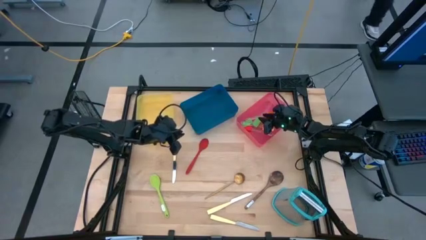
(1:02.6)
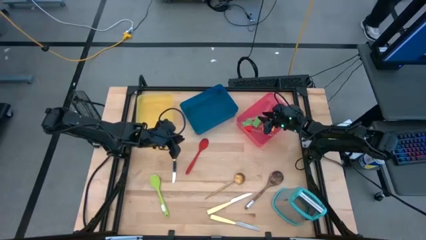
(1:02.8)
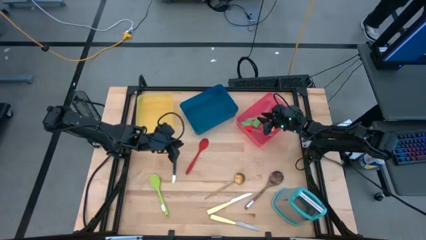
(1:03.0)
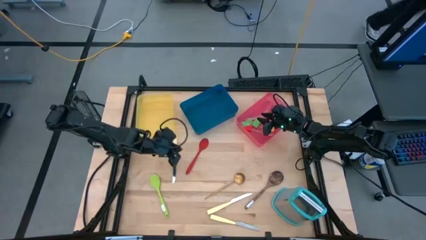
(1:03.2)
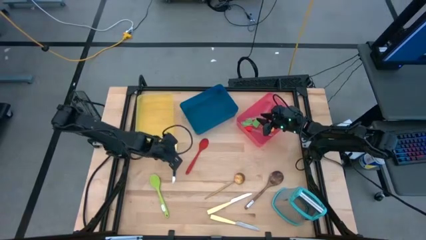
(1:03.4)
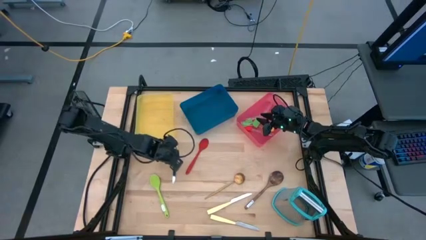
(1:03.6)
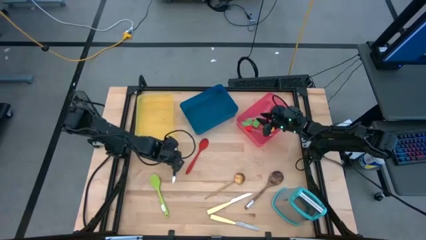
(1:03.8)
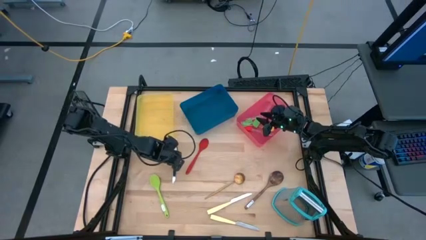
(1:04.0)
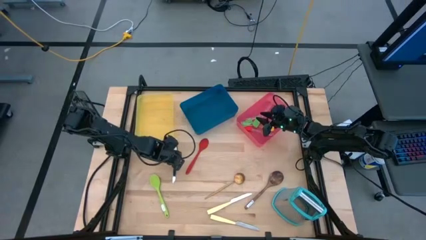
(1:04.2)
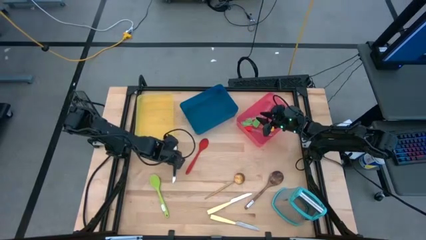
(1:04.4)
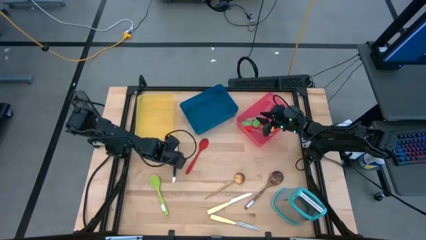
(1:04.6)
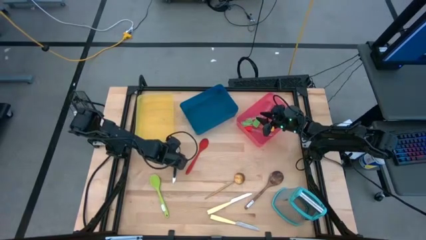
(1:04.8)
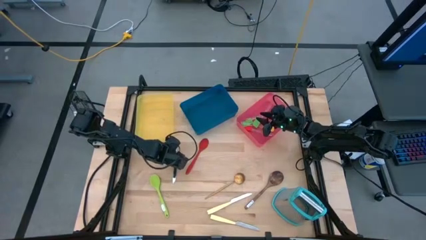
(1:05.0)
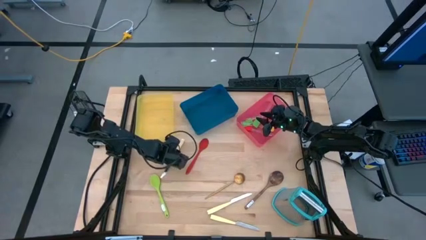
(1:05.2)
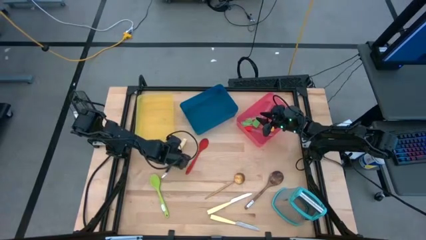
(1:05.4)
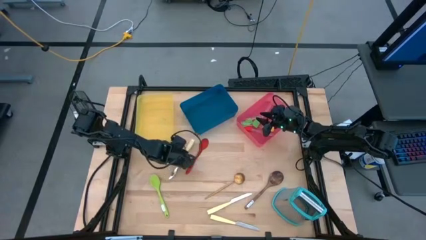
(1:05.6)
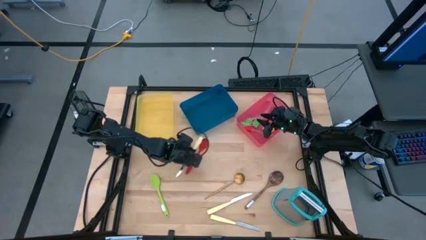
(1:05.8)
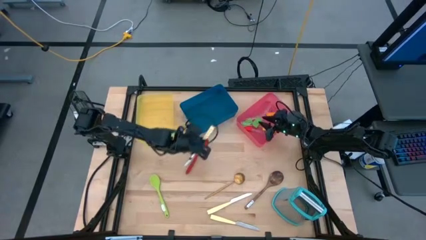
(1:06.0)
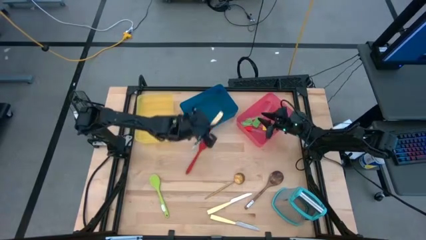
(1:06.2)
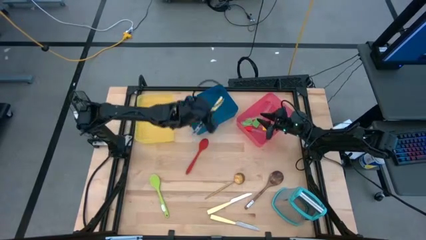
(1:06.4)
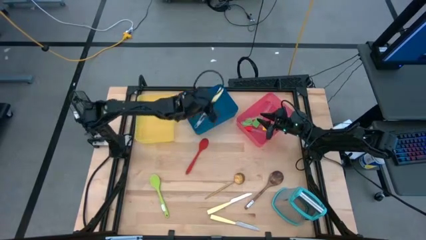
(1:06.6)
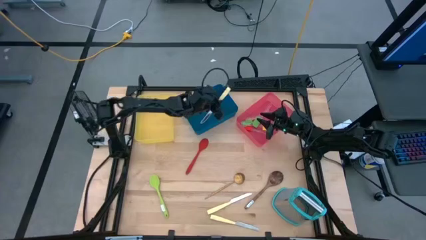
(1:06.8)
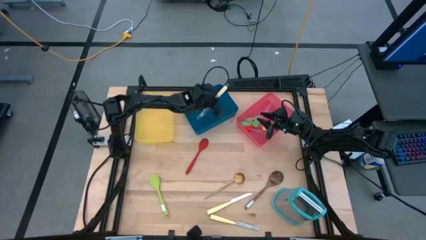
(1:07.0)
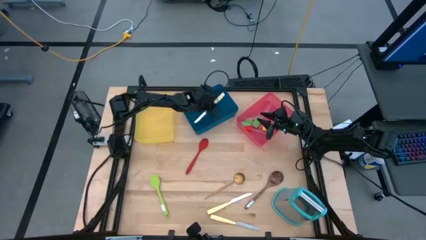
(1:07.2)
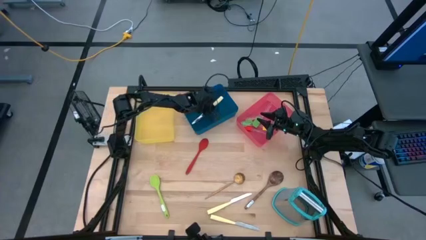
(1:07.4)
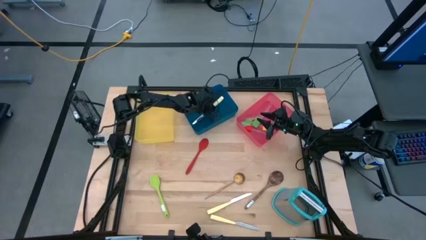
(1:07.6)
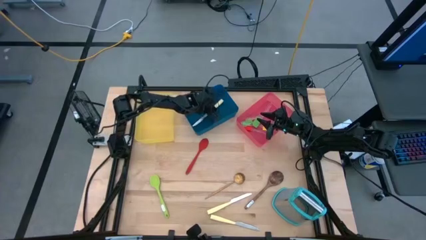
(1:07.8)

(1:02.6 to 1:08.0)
Task: Pick & Place Kitchen Items
Put the yellow knife into the blue bin

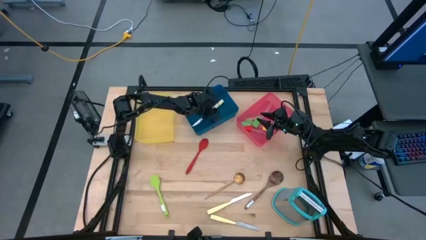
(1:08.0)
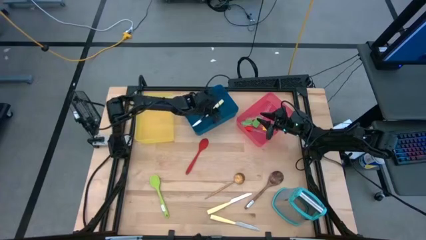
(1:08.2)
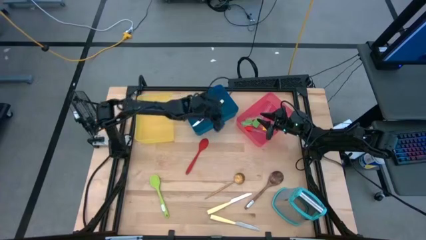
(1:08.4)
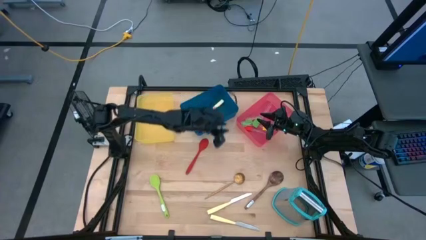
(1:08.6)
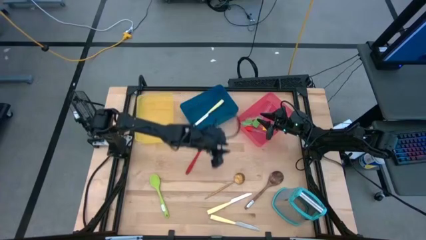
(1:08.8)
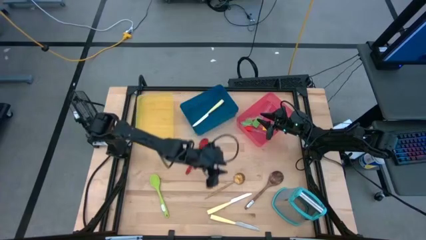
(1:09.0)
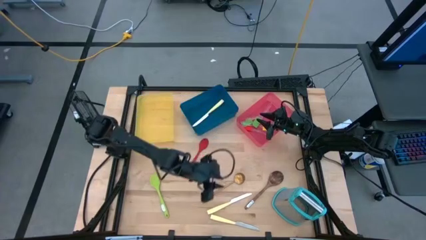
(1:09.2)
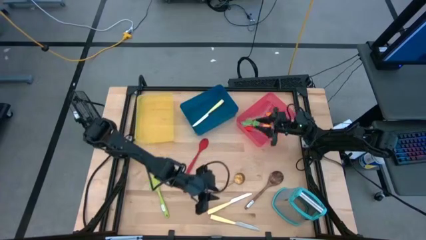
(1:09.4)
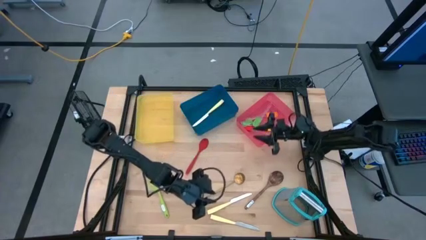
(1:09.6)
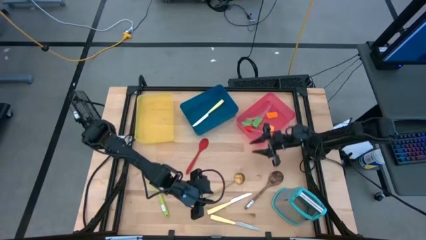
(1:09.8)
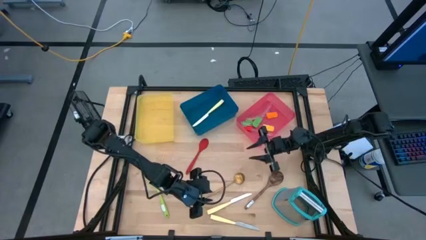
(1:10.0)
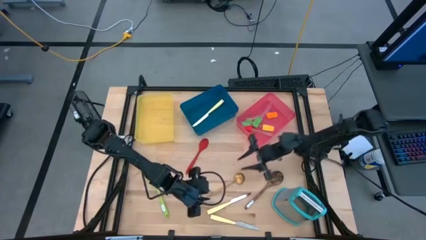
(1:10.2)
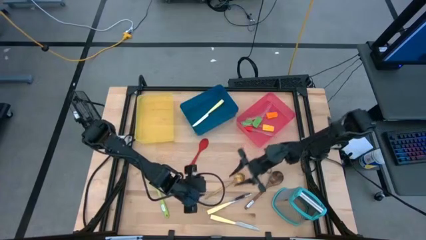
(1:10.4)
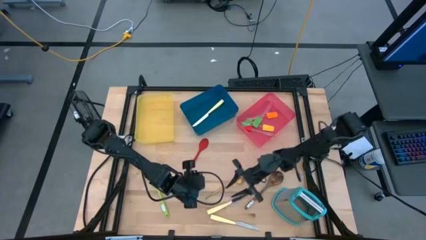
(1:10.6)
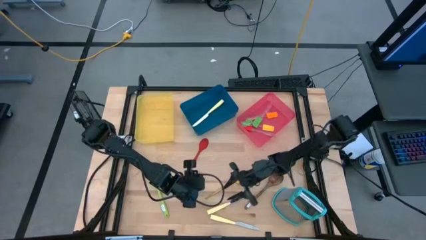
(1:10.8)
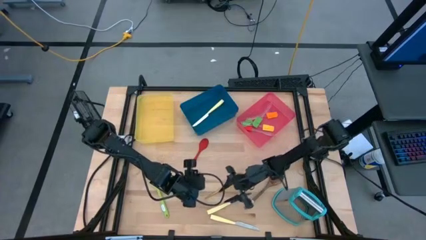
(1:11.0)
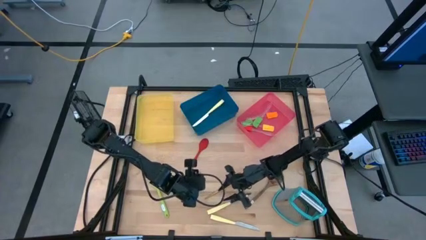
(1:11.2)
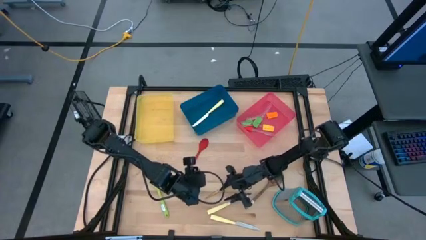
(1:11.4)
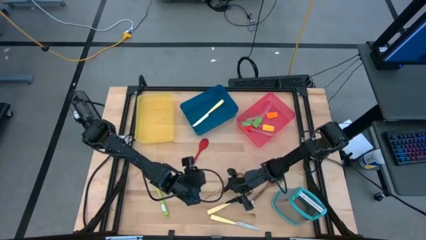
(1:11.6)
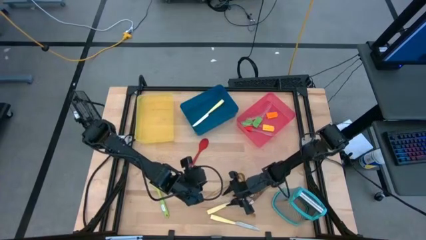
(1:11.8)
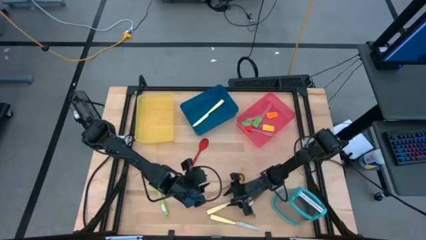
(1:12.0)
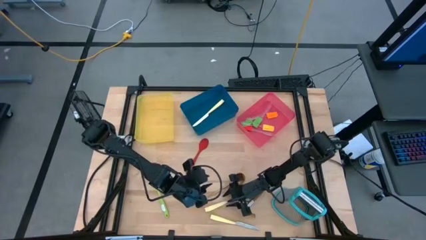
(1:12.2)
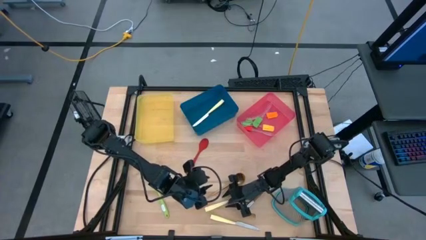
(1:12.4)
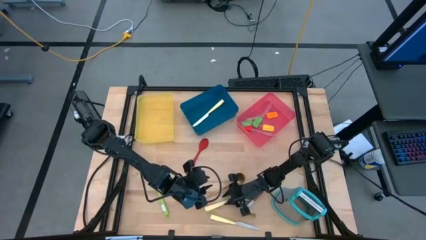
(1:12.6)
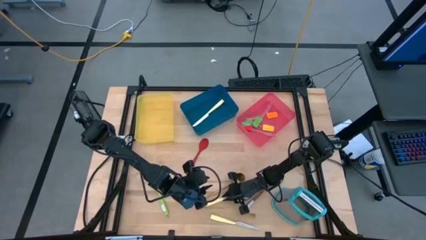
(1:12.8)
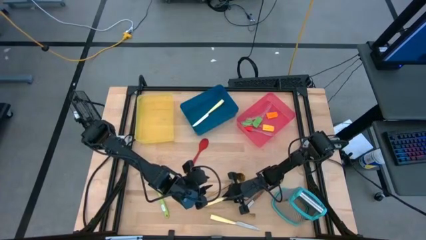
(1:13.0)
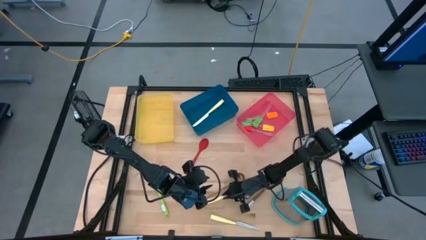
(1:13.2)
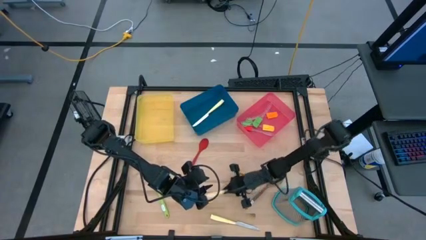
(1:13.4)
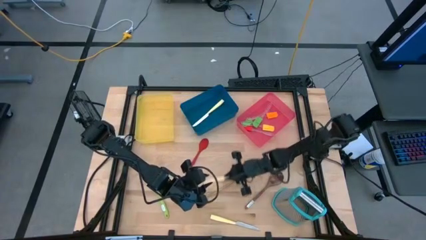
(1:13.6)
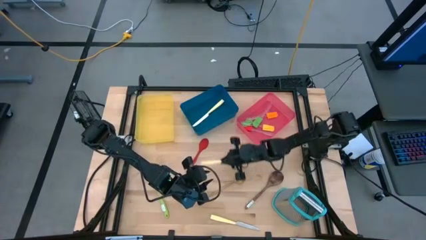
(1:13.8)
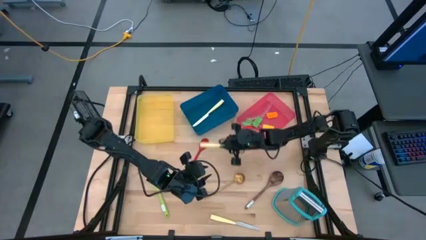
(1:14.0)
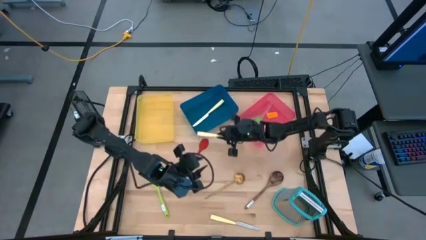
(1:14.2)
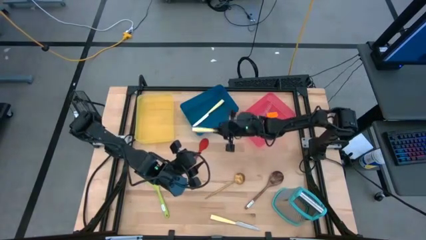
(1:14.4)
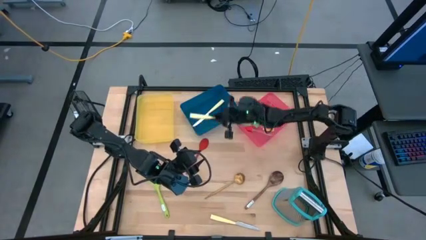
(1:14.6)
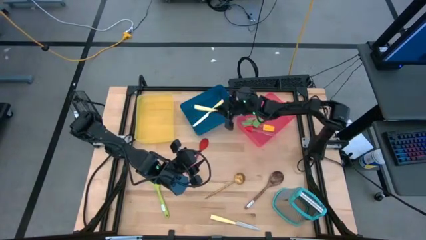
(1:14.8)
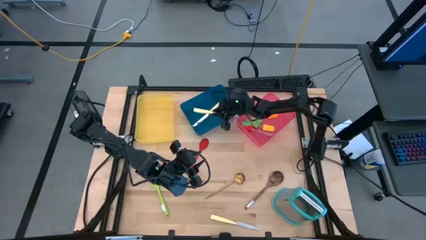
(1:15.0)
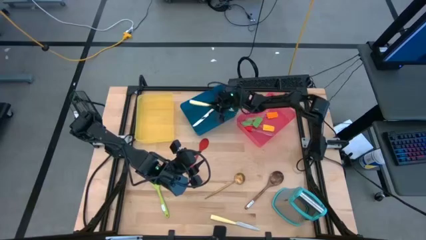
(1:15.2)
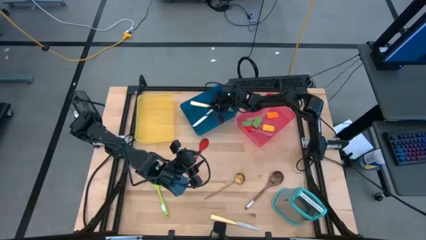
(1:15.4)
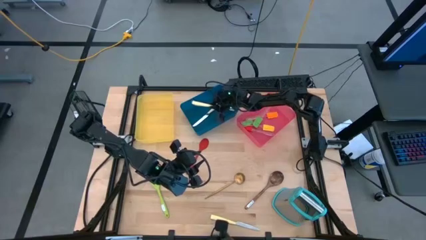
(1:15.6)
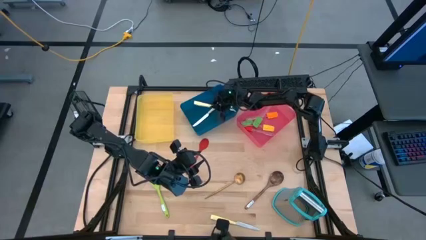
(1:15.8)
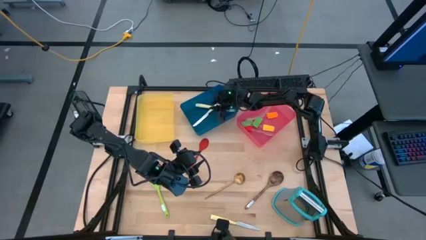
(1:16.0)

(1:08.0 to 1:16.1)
Put the yellow knife into the blue bin

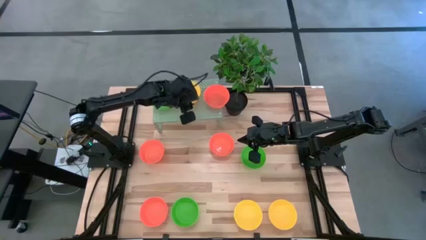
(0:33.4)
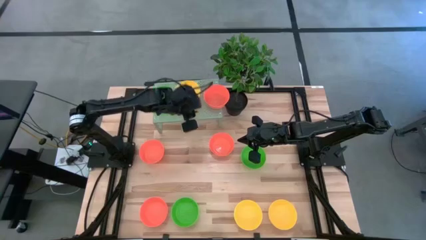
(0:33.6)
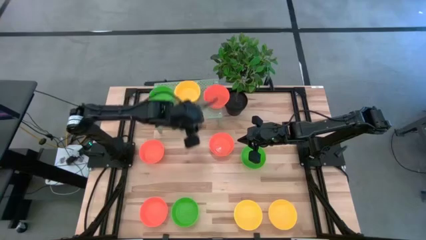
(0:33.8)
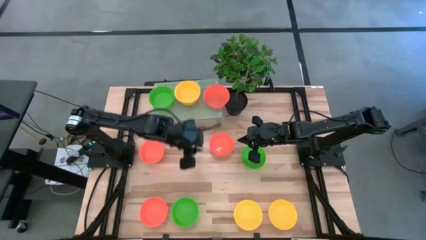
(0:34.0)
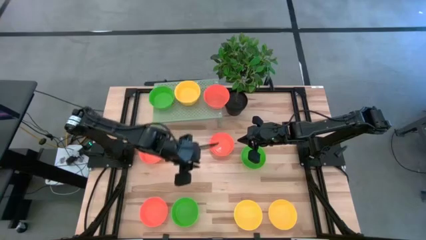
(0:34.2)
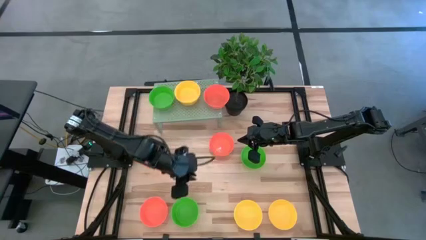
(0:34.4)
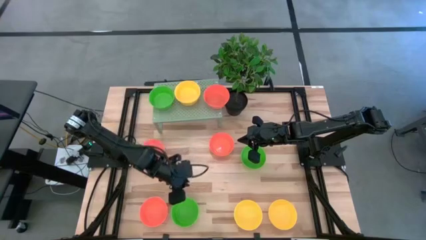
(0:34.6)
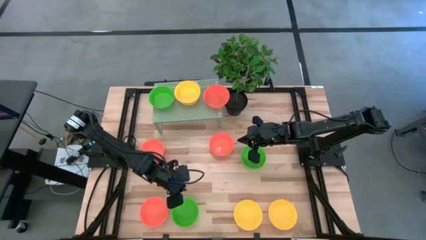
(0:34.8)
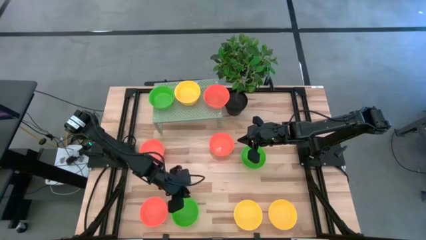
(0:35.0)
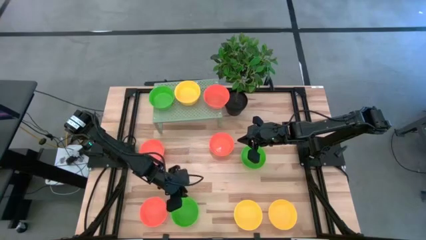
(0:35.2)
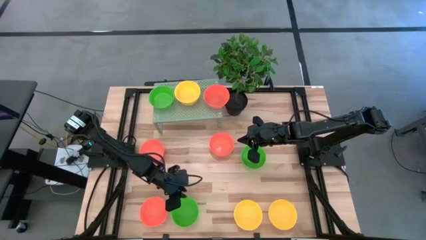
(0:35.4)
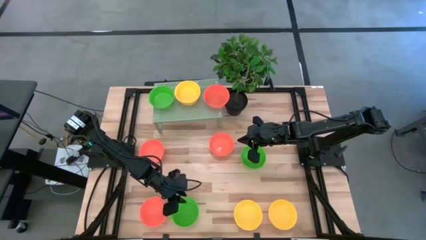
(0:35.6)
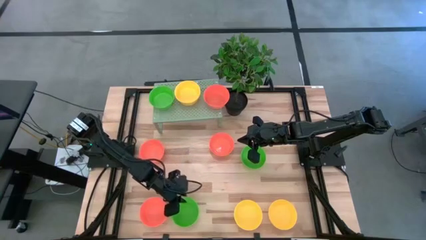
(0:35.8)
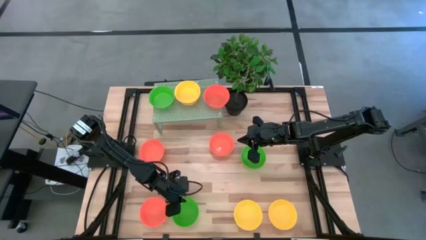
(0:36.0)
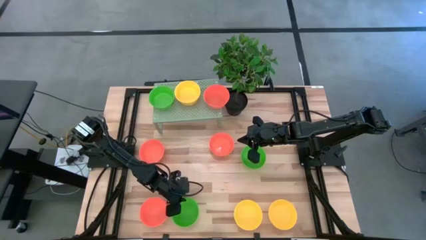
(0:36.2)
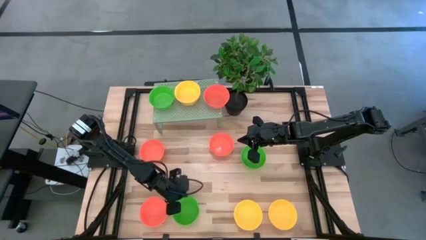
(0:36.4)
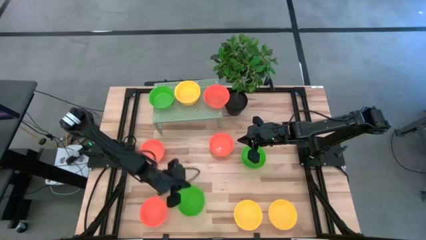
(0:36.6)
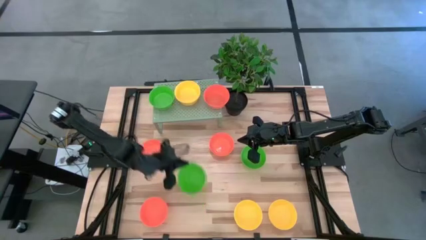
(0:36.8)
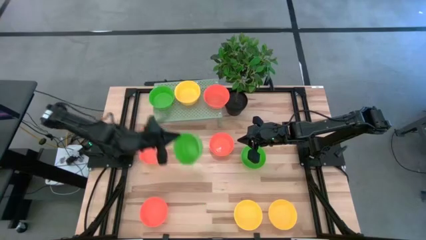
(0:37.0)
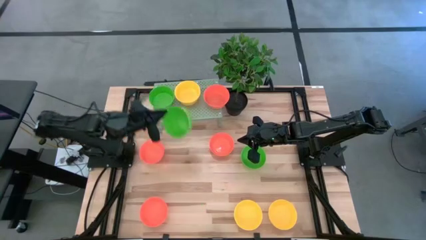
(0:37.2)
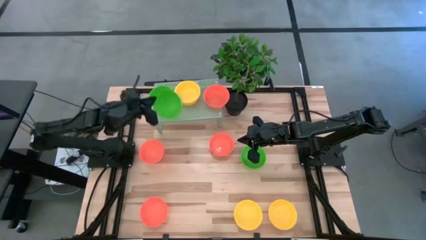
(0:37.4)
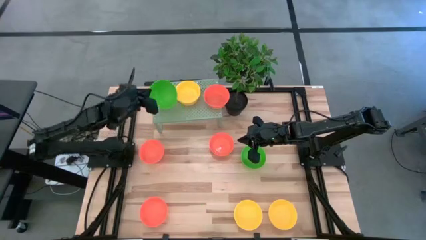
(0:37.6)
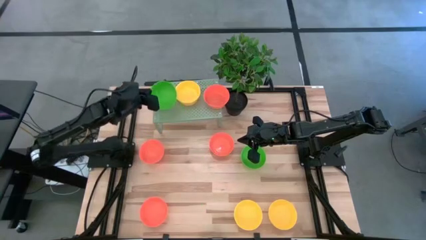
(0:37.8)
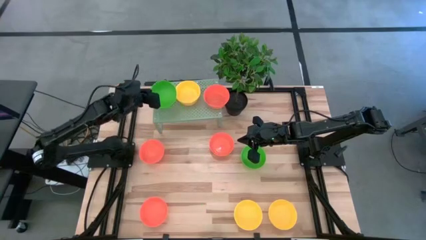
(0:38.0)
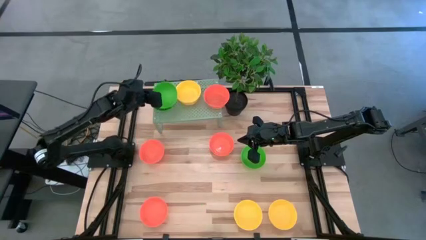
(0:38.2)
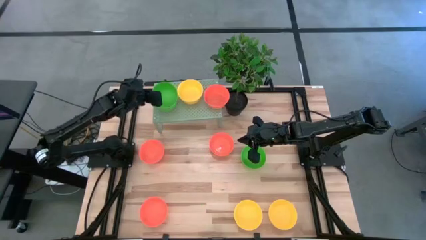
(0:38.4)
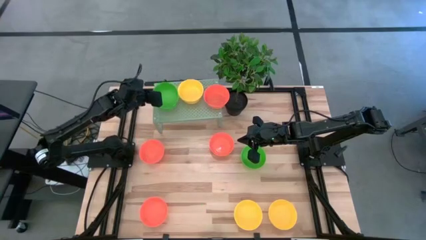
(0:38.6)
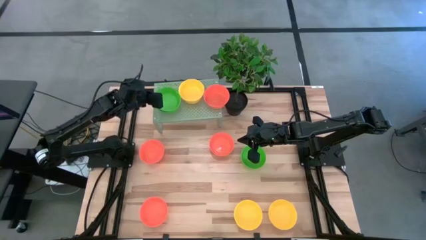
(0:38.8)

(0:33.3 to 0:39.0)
Task: Pick & Place Mini bowls
Stack the green bowl on top of the green bowl on the shelf
